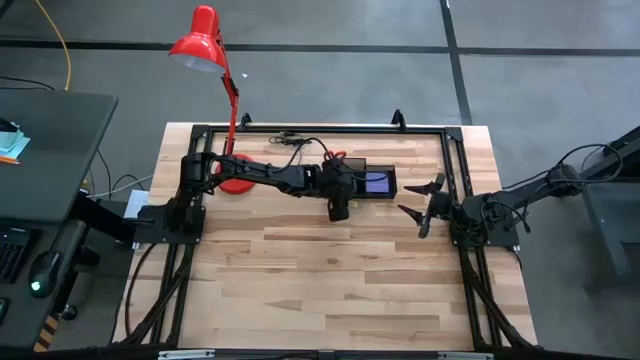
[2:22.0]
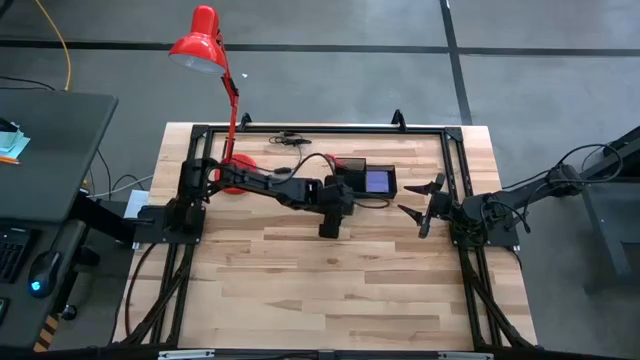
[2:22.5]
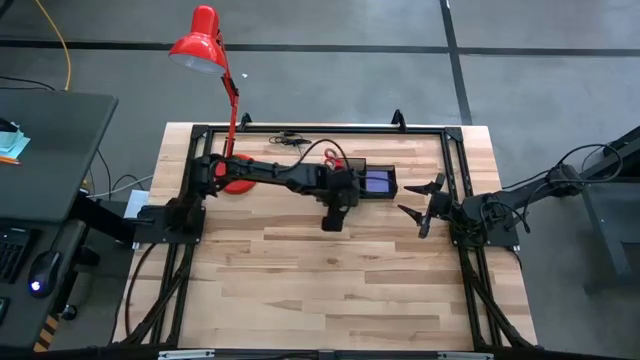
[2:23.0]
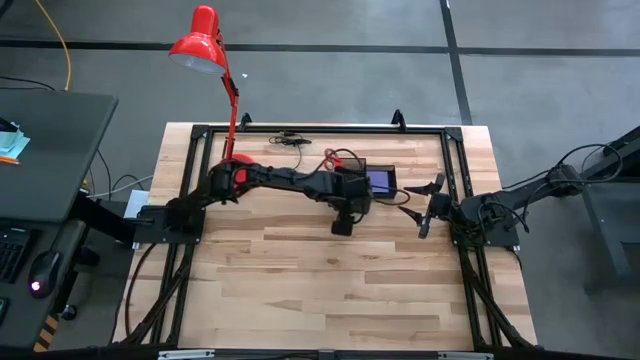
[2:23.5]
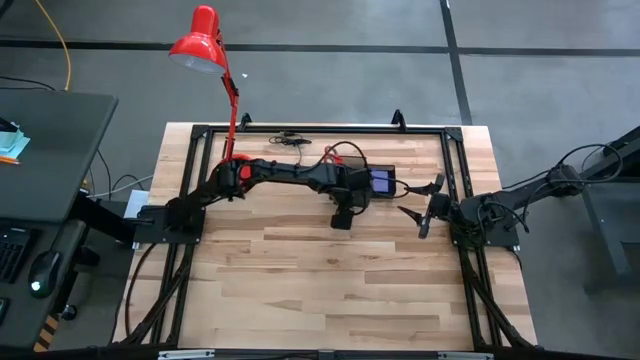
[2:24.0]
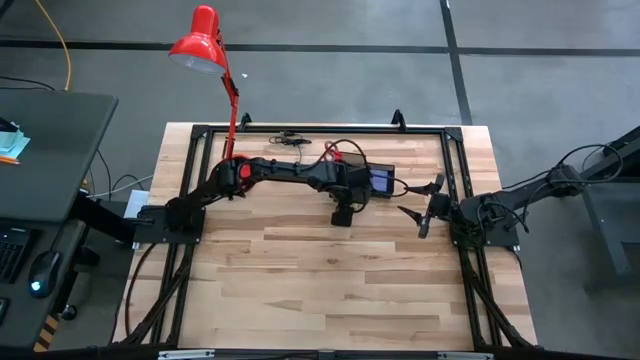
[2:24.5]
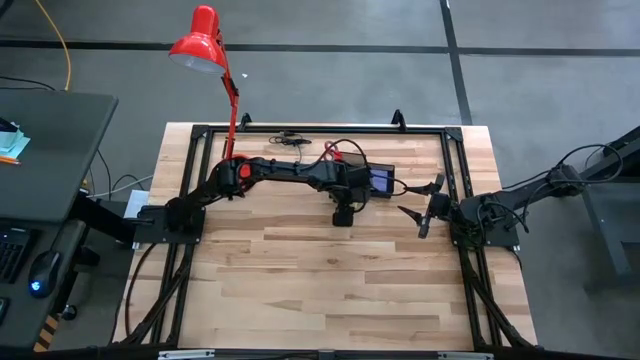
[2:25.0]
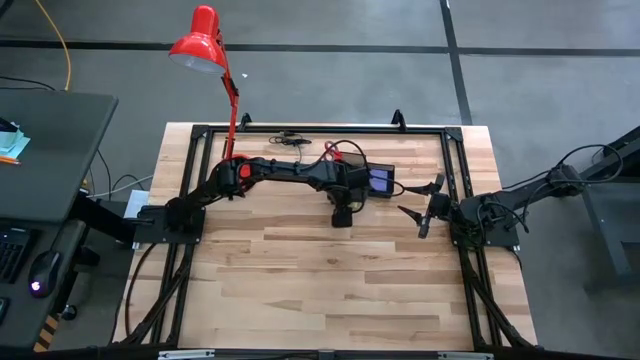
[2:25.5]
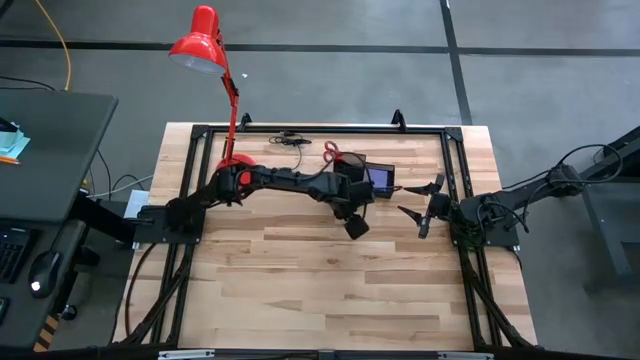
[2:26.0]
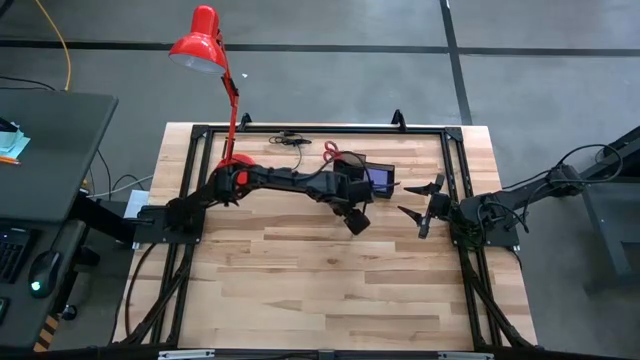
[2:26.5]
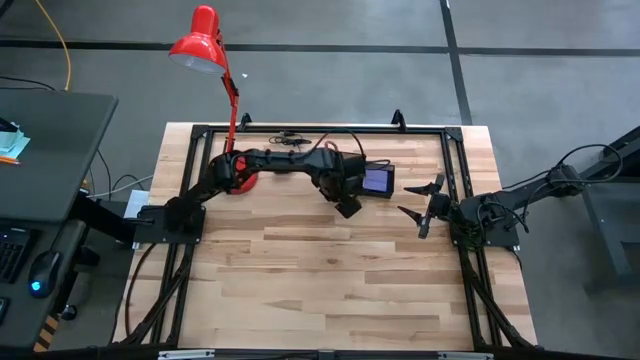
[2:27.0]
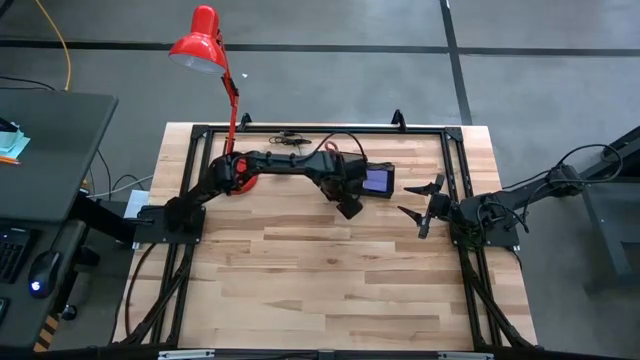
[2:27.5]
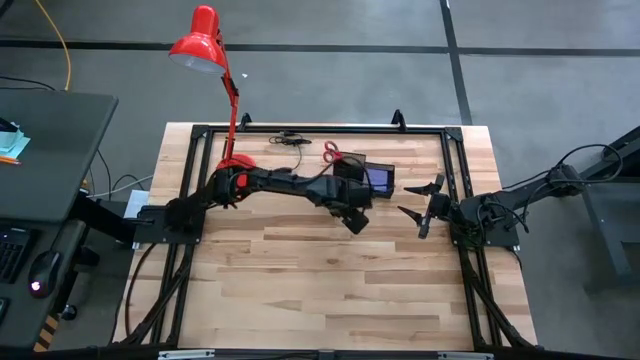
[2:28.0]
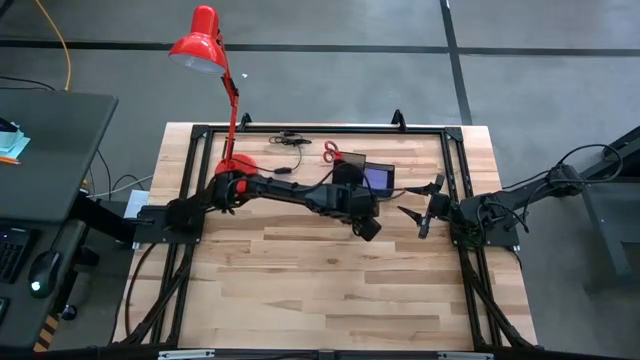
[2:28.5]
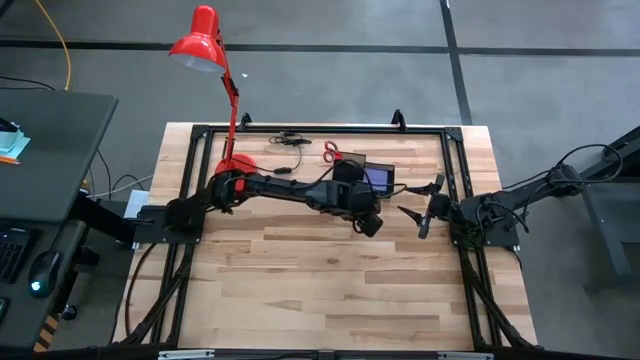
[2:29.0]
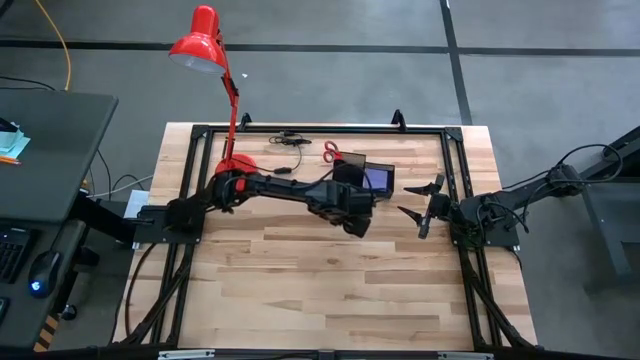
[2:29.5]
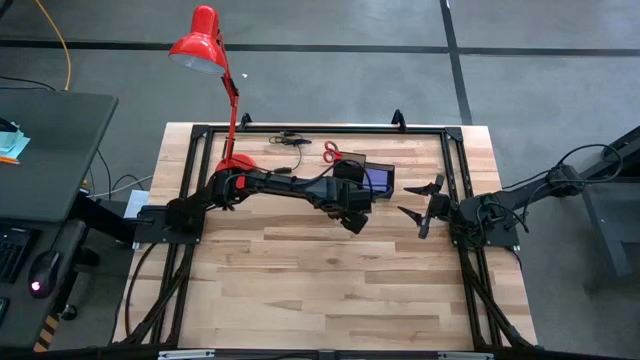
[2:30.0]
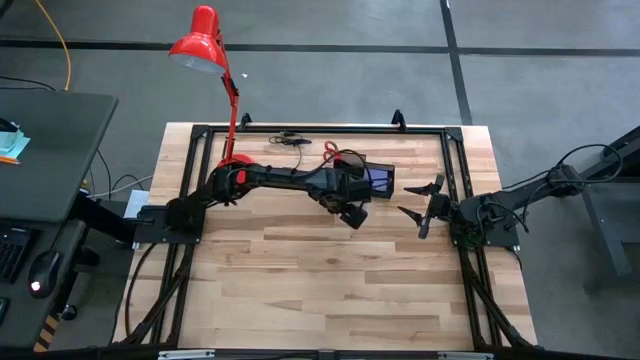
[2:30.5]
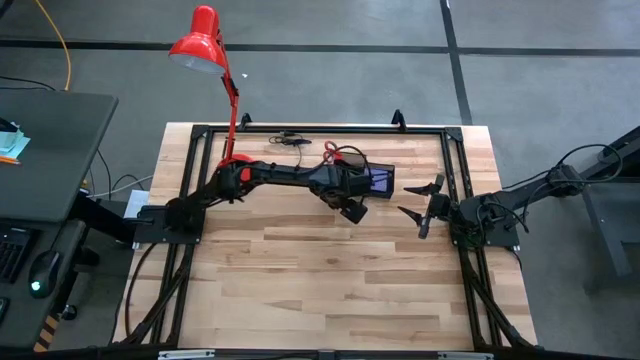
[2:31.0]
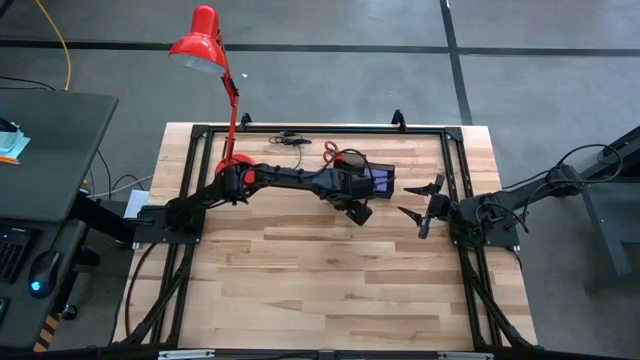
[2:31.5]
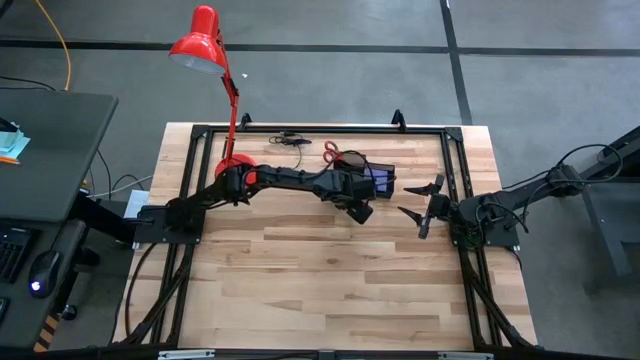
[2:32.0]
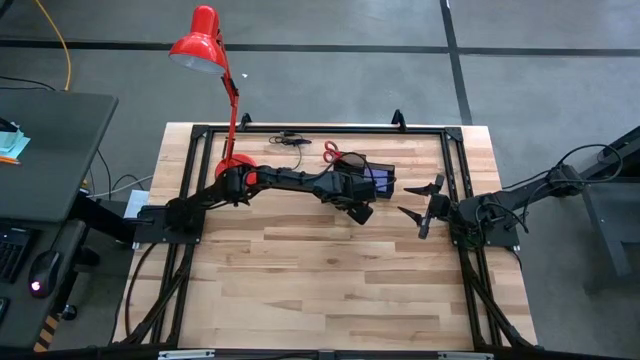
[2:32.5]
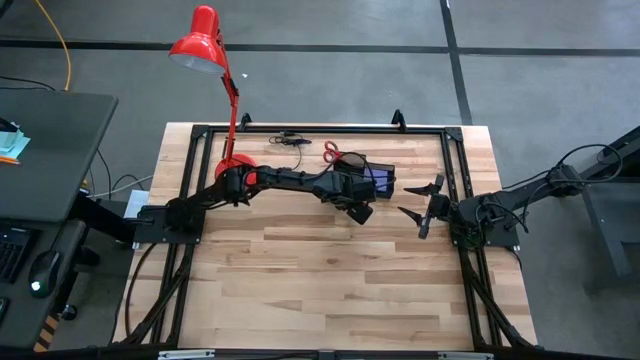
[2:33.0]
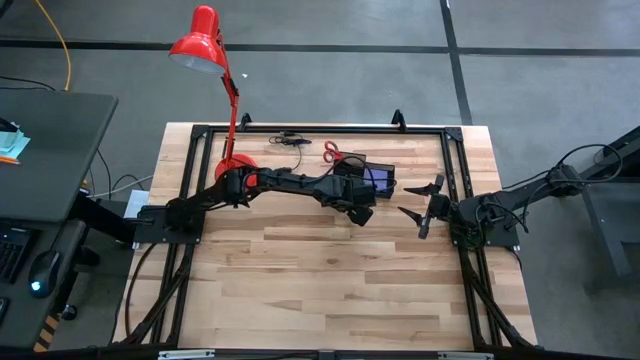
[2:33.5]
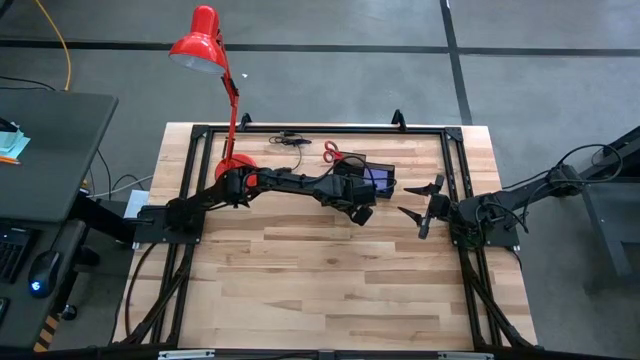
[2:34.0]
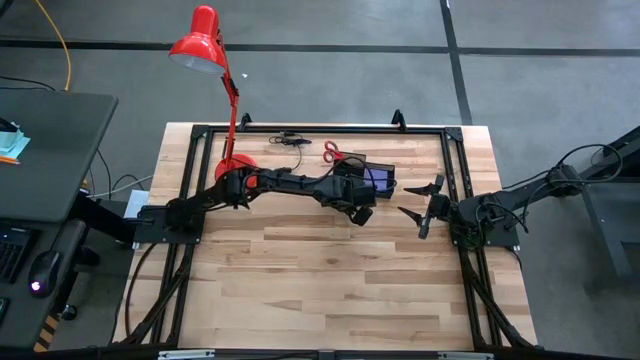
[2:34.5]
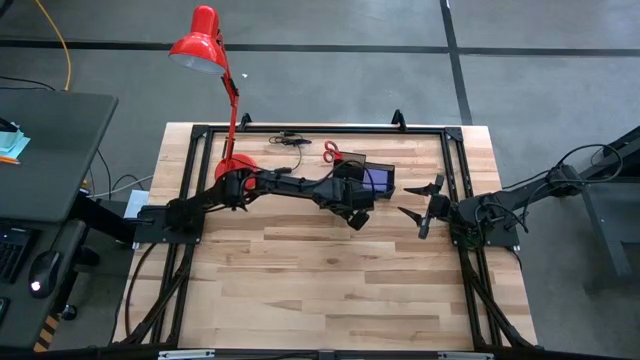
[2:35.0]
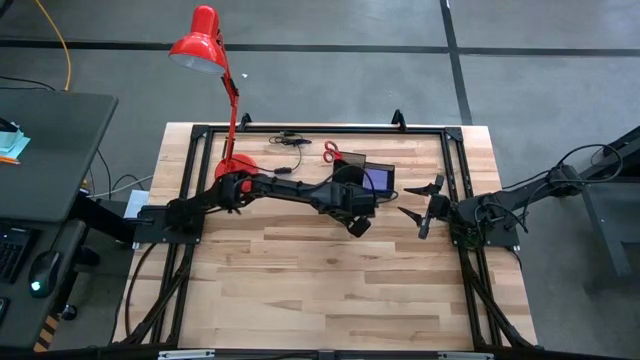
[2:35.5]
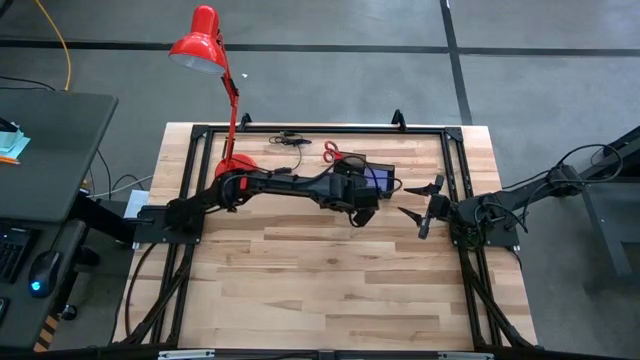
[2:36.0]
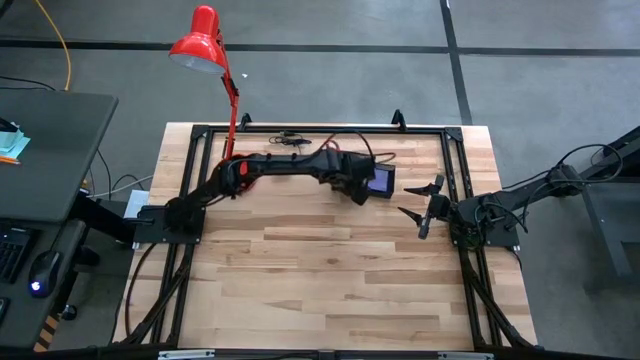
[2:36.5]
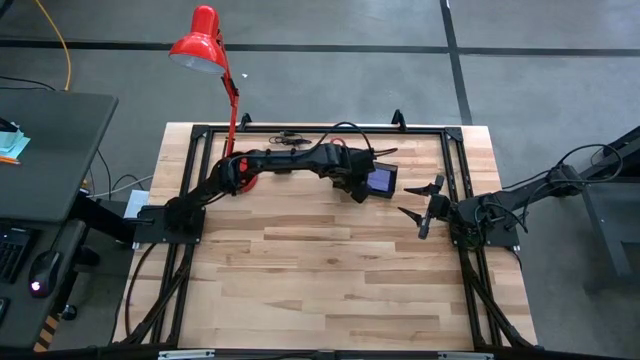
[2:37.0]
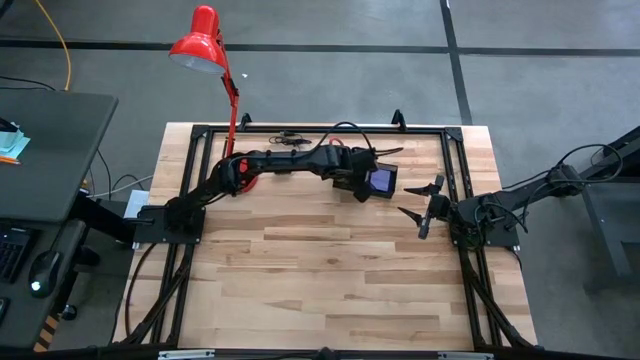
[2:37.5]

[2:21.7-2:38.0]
Task: Pick and place office supplies into organizer
Put the light green eraser into the black desk organizer

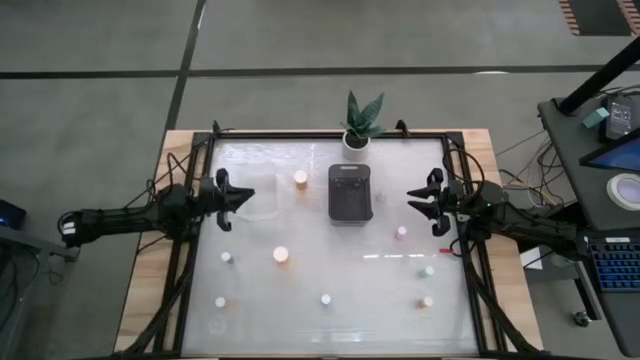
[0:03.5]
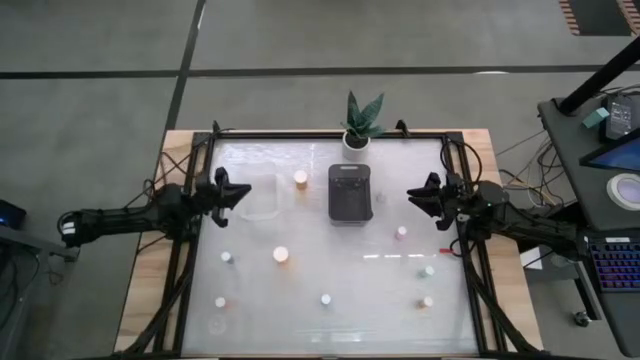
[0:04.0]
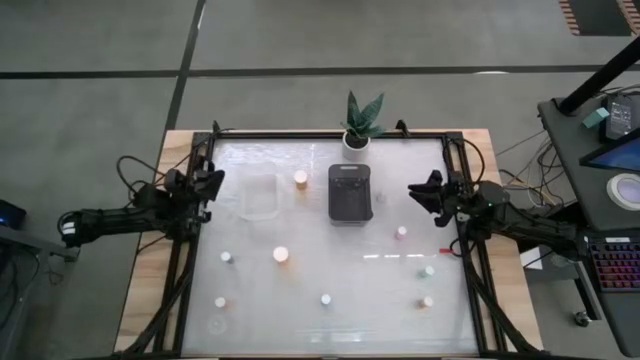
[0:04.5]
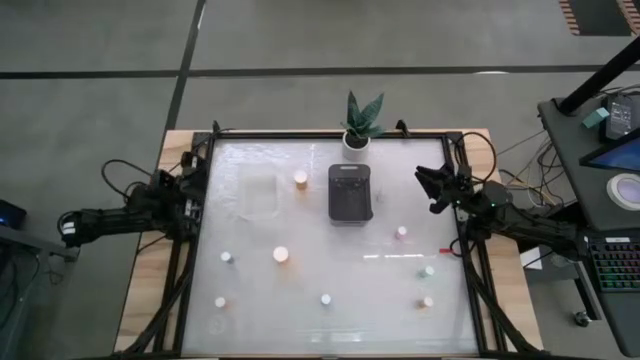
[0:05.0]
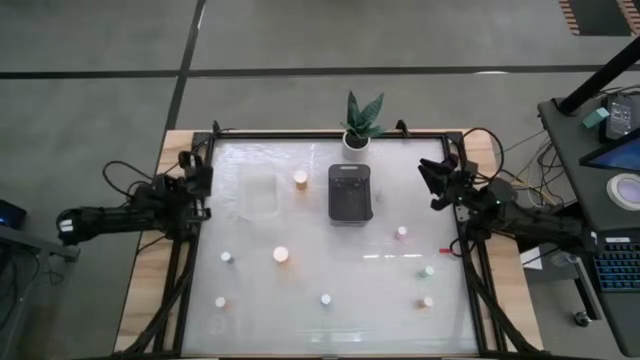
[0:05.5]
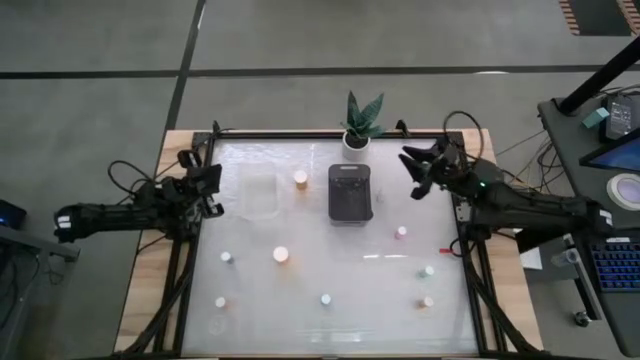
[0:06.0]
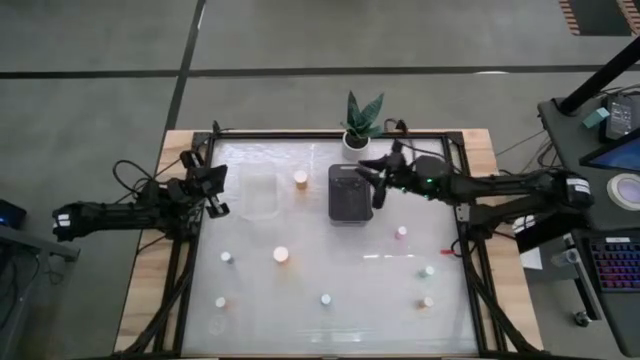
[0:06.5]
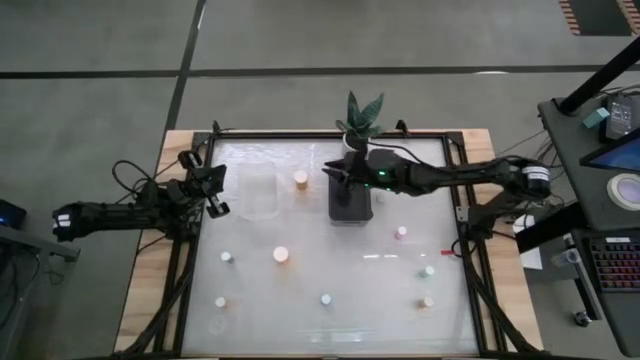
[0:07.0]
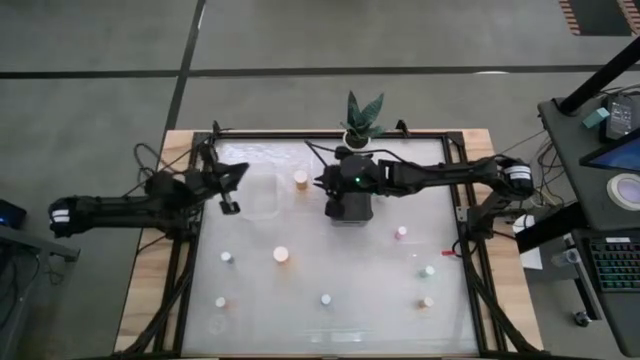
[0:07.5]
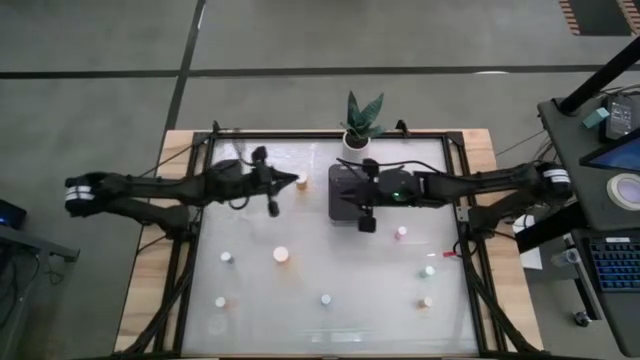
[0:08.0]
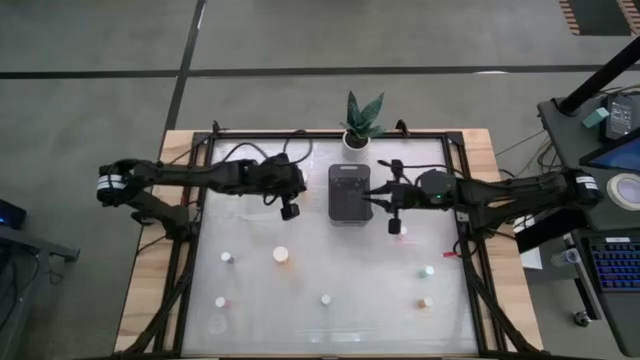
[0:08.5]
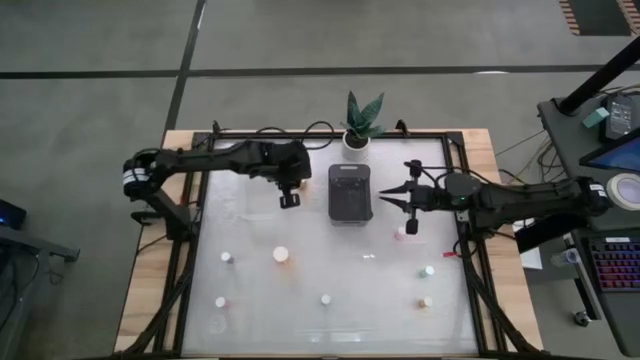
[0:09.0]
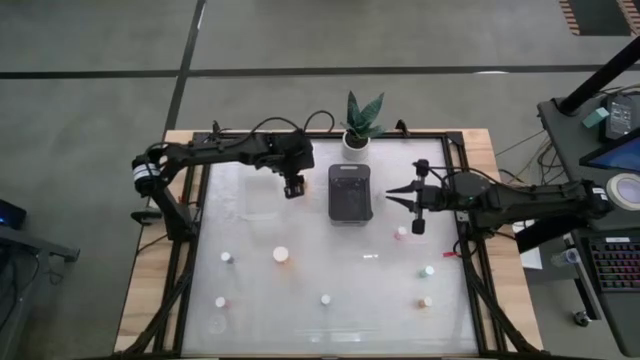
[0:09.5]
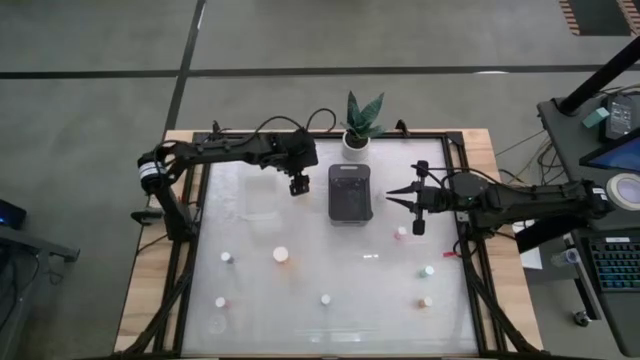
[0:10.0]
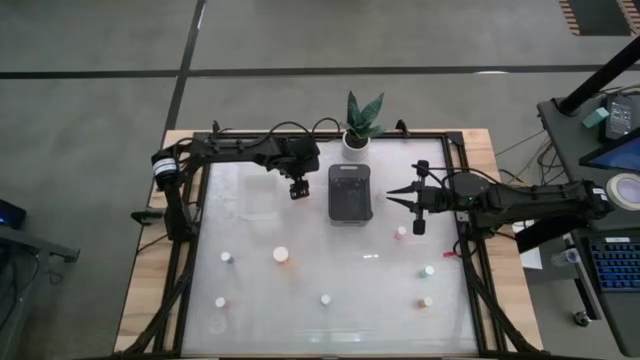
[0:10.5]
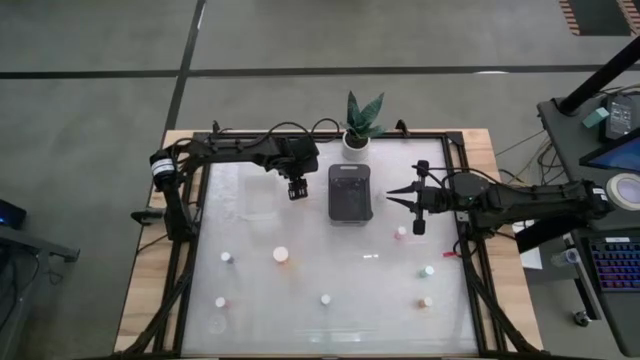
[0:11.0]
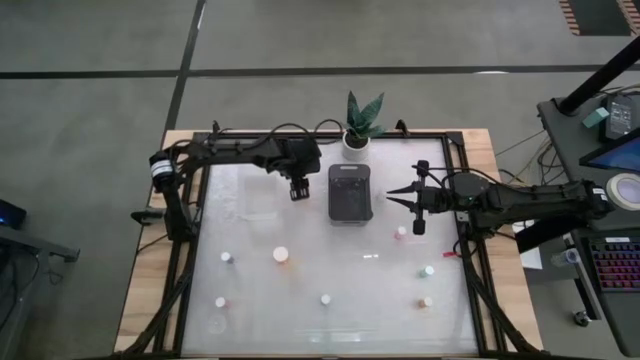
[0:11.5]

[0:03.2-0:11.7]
Task: Pick and place medicine bottles into bin by pill shape (circle, oval)
Put the top center yellow pill bottle into the transparent bin
